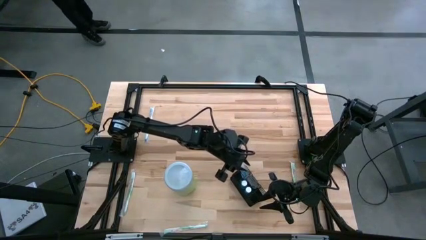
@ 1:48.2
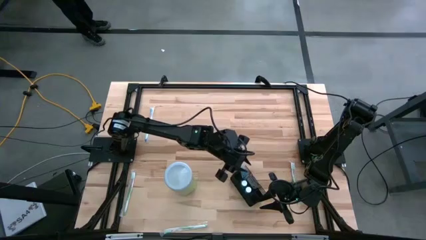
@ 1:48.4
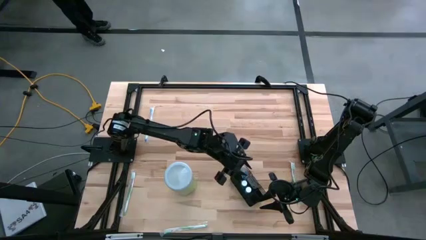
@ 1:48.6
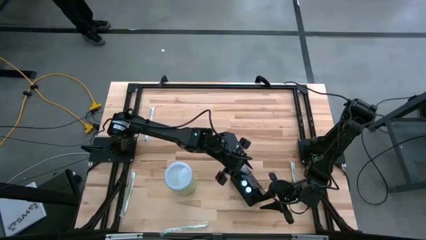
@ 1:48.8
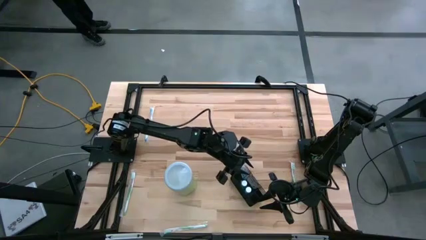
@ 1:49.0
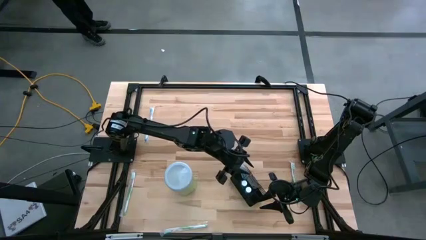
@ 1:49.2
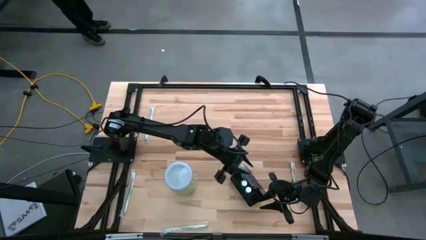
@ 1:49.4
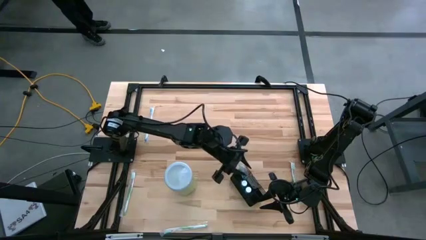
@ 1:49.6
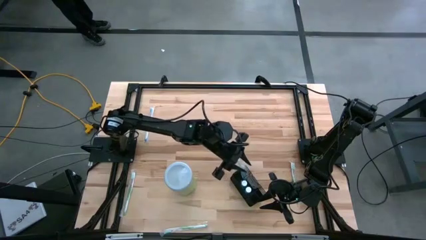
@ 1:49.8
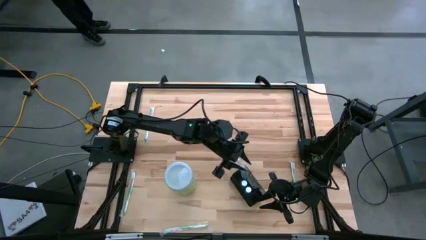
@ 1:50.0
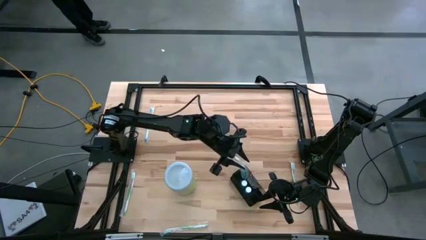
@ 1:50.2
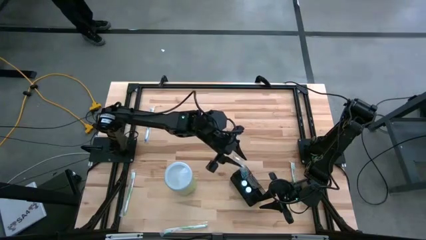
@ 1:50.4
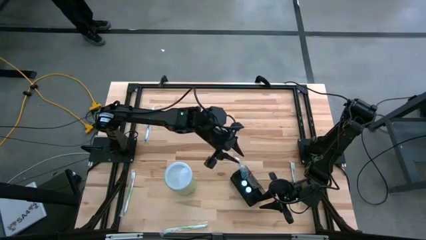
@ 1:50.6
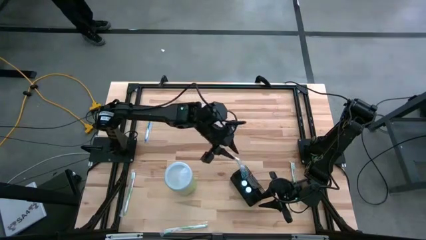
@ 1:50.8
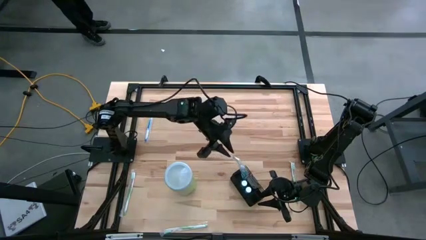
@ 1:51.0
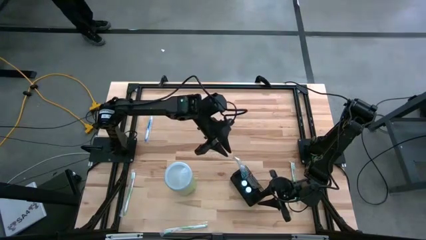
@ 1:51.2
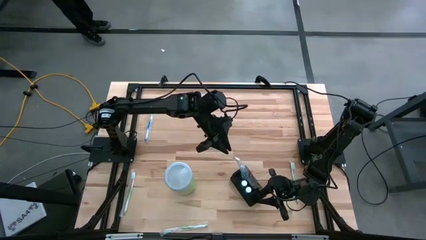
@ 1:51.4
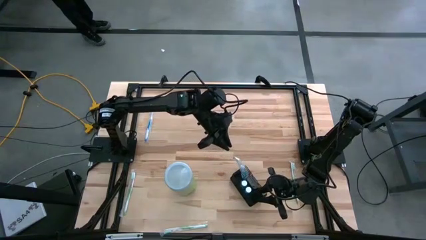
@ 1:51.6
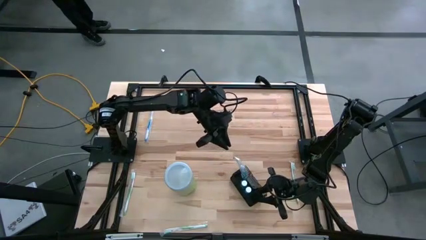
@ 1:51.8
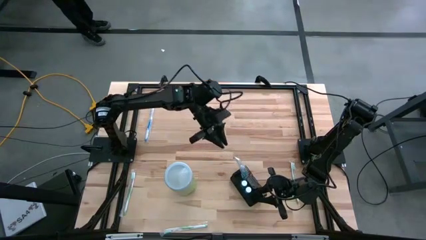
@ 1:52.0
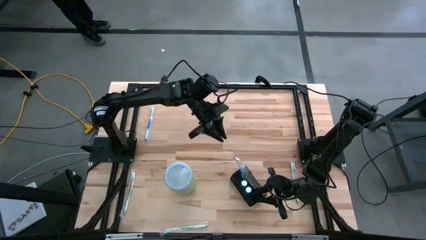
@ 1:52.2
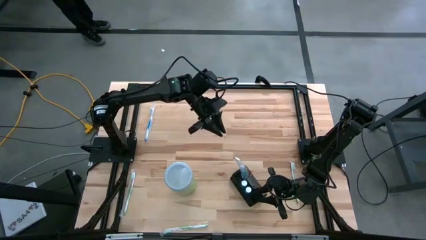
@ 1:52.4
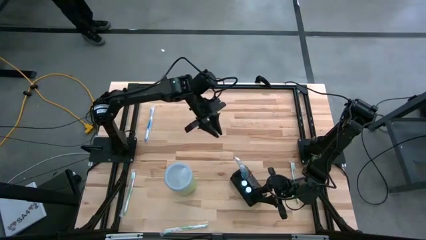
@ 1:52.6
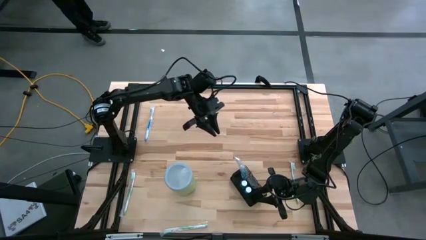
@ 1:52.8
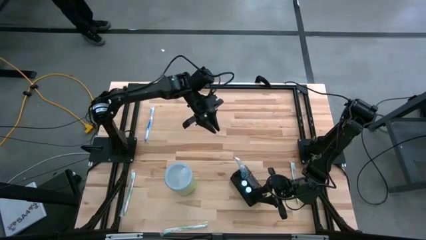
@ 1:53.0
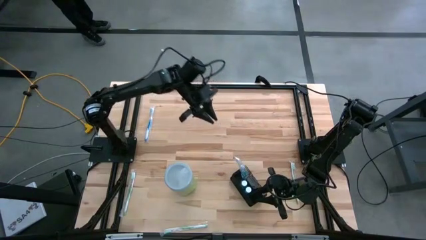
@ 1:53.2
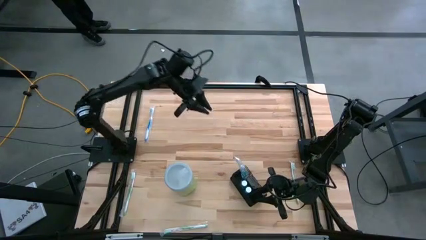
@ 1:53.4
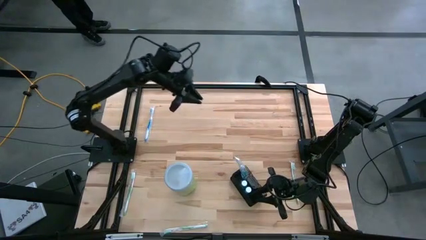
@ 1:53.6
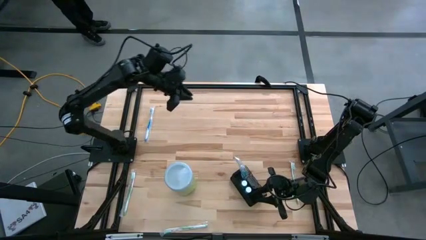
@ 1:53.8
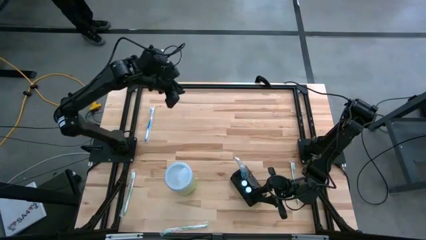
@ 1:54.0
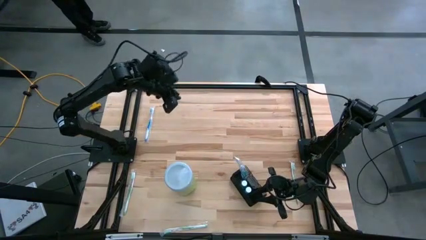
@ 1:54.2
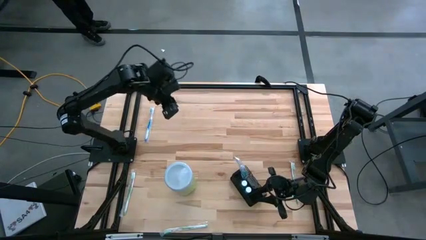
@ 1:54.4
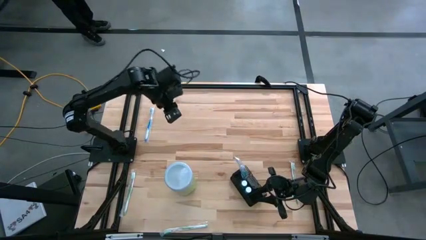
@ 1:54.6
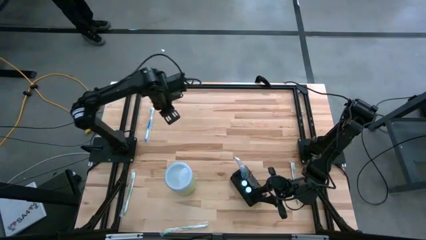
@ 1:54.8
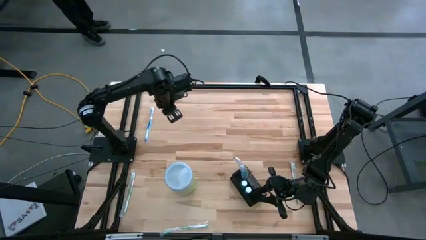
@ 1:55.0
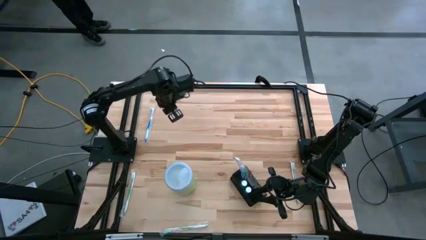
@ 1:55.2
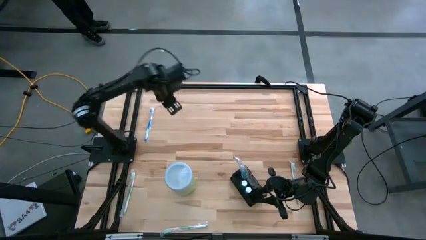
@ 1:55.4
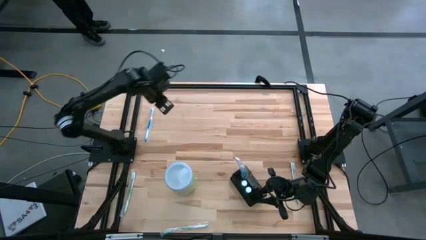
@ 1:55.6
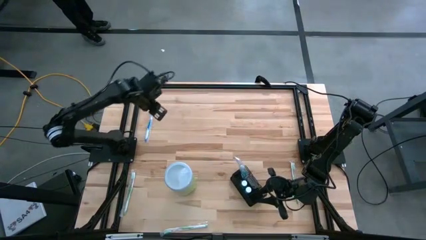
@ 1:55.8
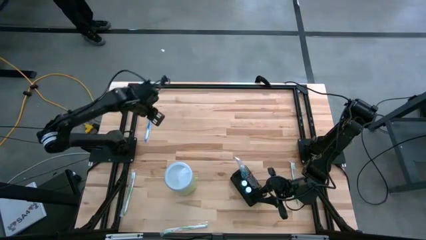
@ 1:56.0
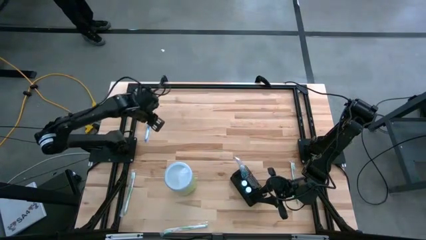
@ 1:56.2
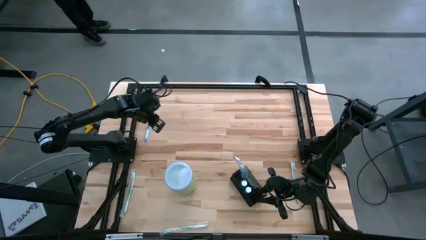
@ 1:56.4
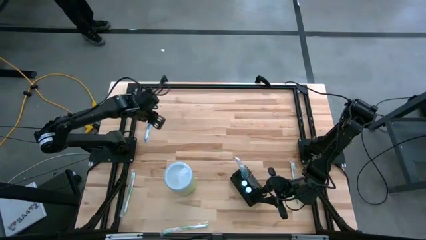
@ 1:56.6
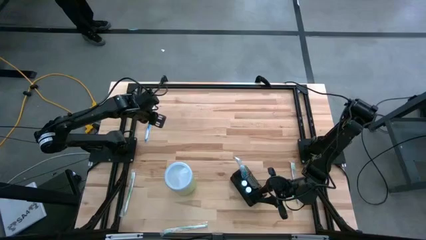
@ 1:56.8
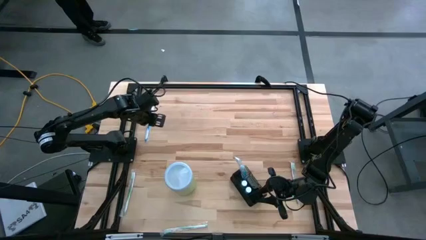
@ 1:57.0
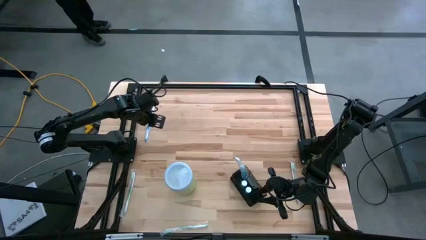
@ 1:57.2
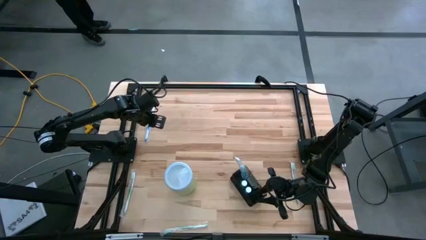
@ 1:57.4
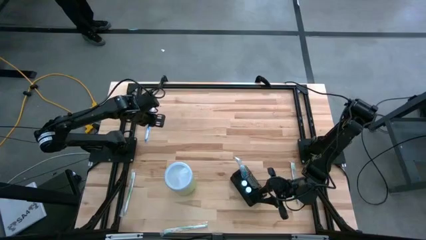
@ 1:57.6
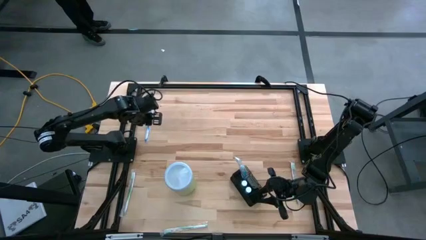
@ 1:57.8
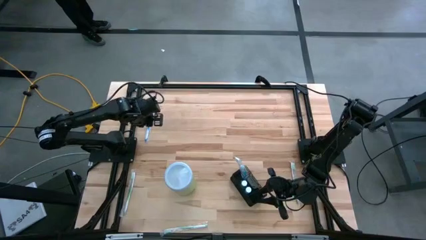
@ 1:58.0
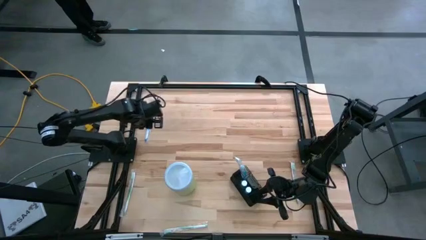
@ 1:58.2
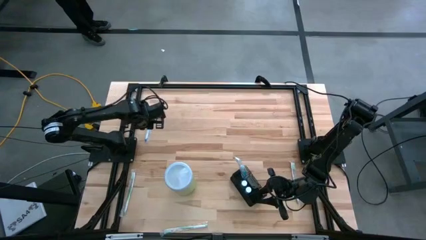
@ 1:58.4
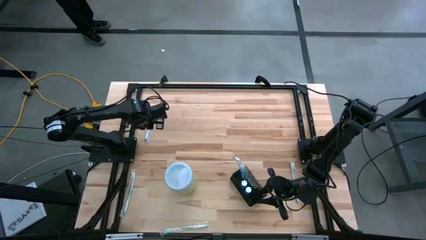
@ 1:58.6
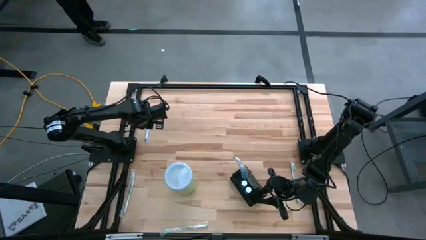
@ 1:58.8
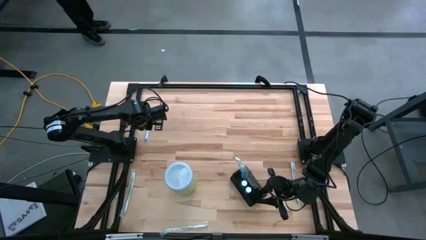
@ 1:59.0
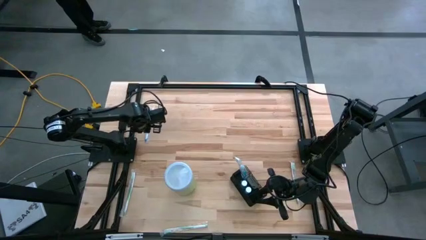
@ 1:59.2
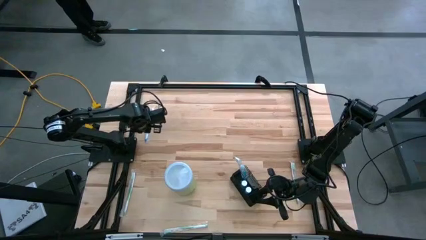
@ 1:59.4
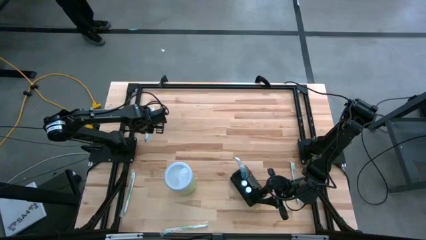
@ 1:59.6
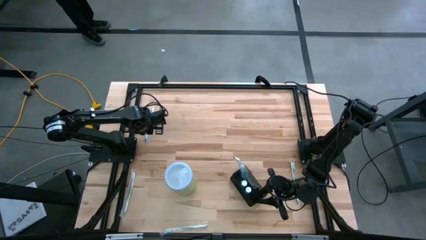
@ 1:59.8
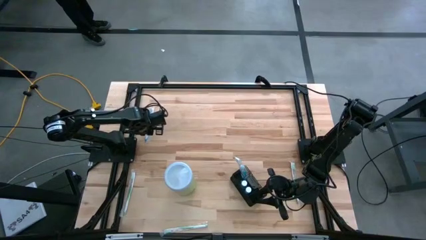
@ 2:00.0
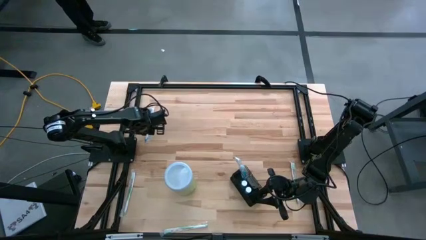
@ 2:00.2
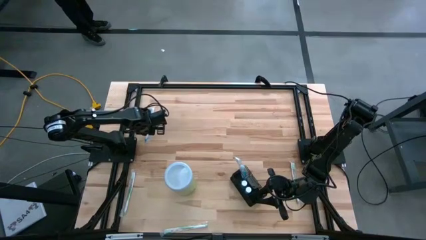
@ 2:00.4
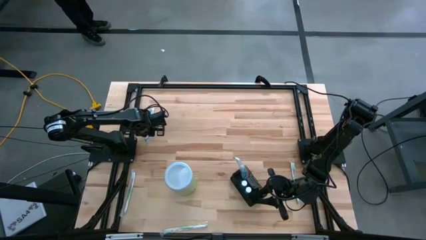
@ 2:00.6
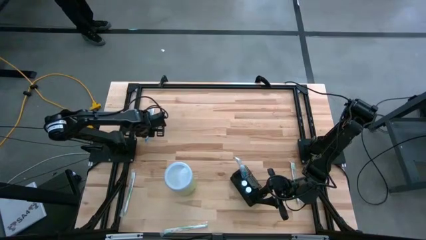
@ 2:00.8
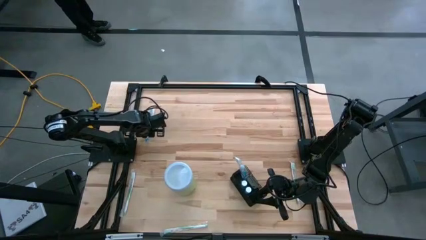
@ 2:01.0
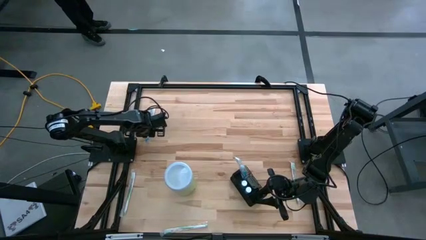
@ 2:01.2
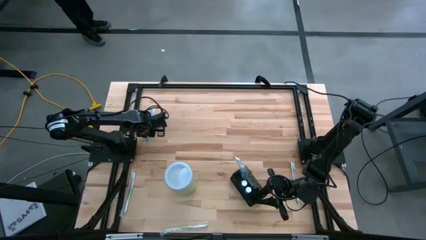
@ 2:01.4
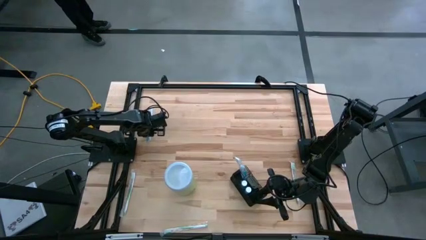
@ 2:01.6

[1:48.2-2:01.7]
Task: Pick & Place toothbrushing station
Put the blue toothbrush into the black mesh organizer

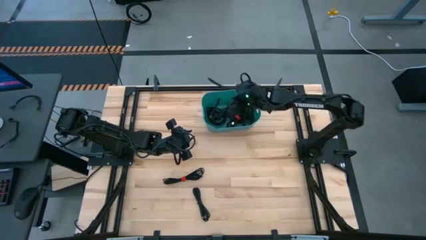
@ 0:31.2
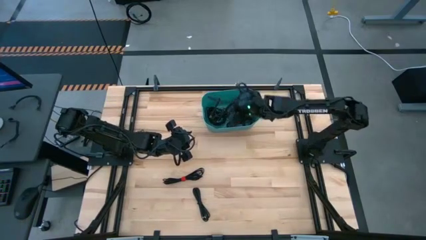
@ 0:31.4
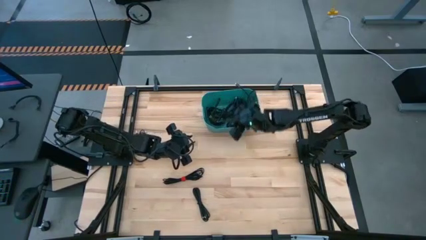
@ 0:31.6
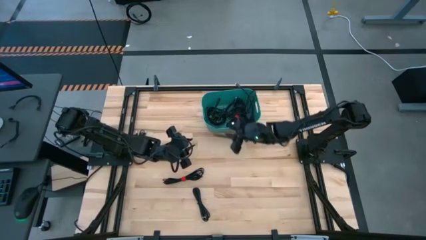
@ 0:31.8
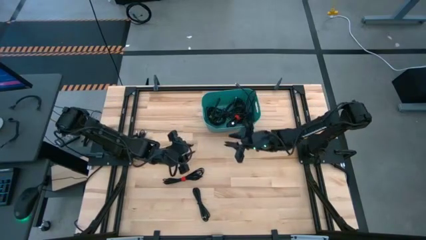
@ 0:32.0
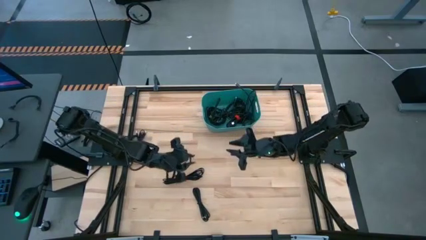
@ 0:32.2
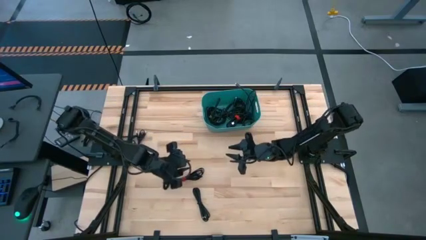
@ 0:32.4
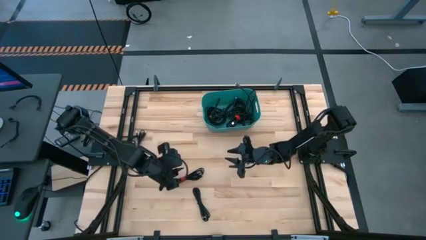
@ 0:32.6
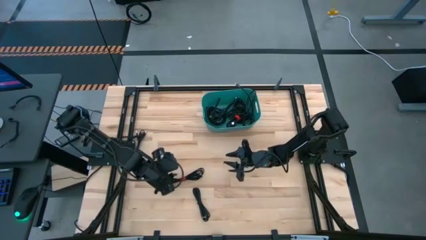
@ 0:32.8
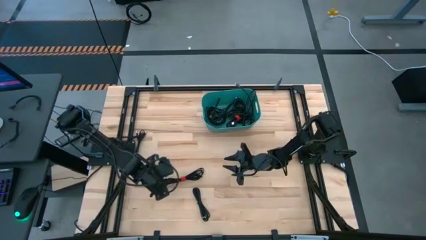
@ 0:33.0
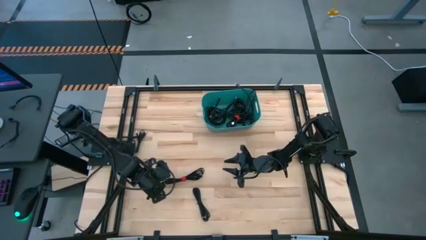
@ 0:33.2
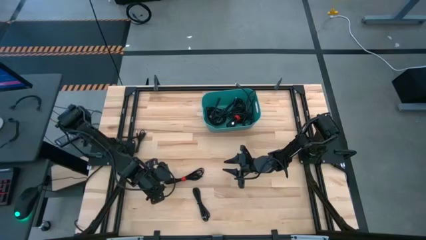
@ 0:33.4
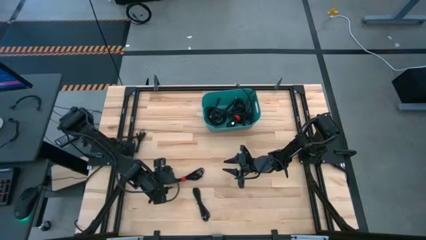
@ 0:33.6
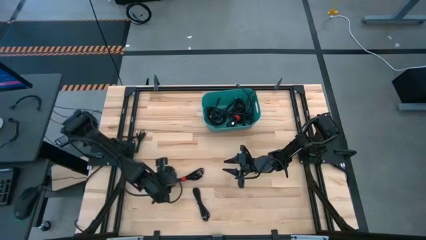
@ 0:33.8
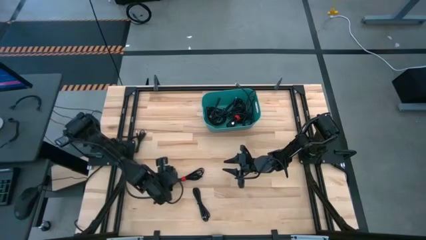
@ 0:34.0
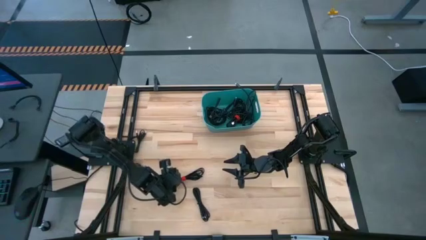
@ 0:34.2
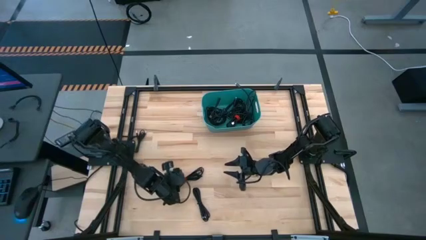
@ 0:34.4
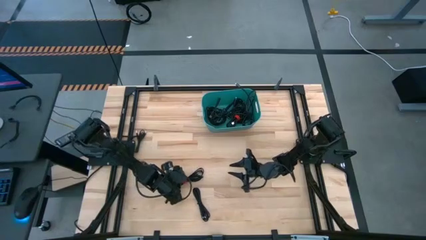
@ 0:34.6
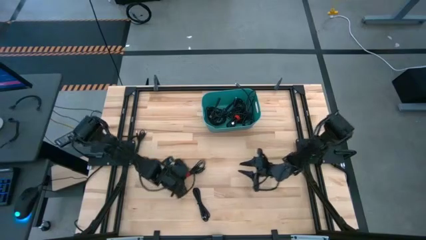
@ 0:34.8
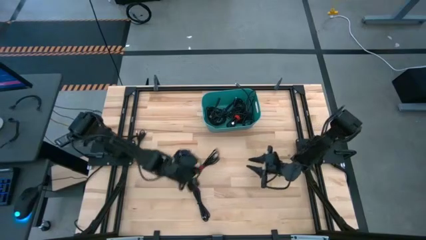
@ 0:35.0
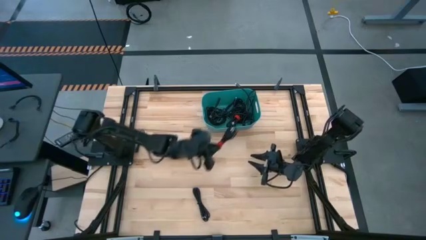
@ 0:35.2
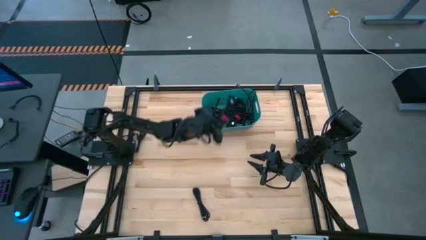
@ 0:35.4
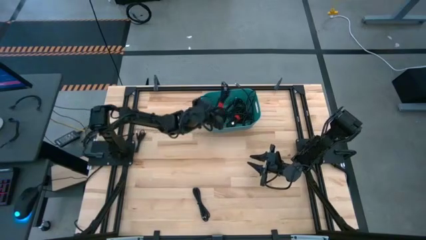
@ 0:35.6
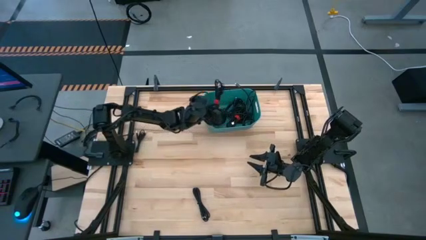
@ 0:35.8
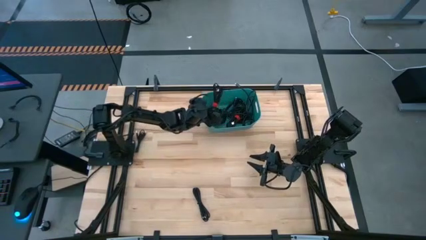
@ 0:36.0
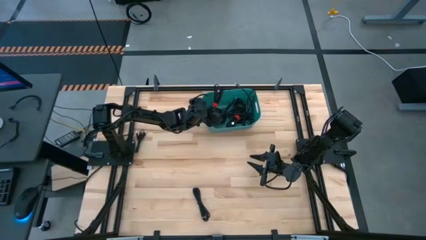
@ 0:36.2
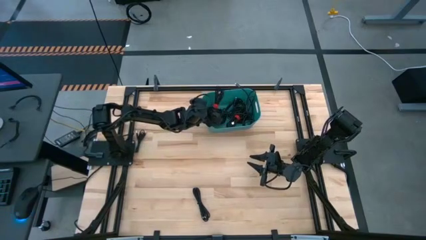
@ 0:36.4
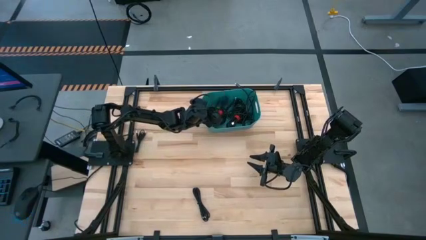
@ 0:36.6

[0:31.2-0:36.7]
Task: Pick and place USB-C Cables
Put the black charger cable into the blue bin
